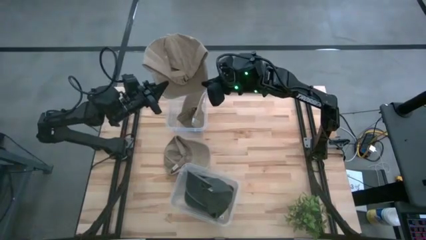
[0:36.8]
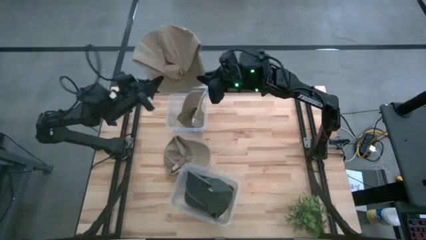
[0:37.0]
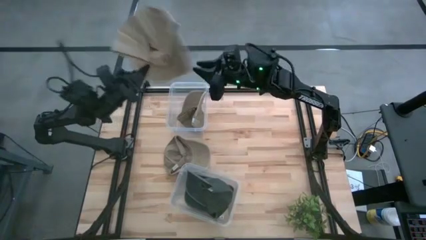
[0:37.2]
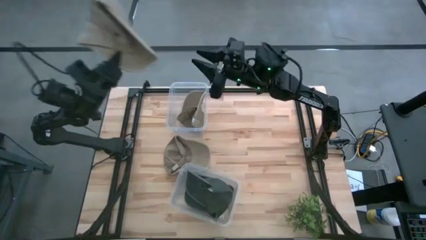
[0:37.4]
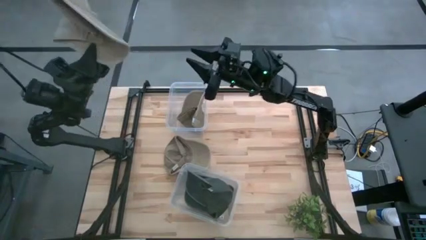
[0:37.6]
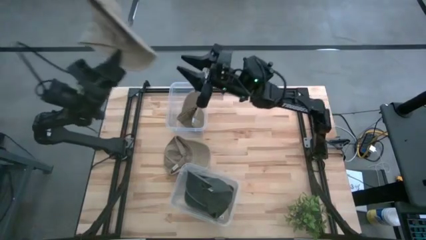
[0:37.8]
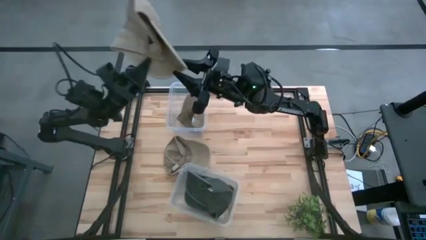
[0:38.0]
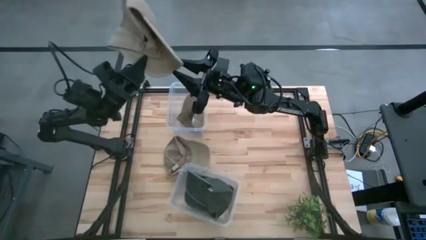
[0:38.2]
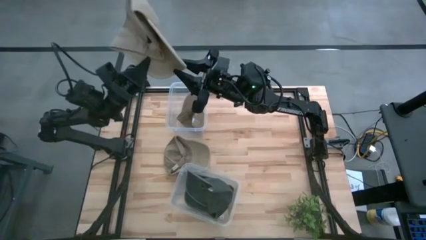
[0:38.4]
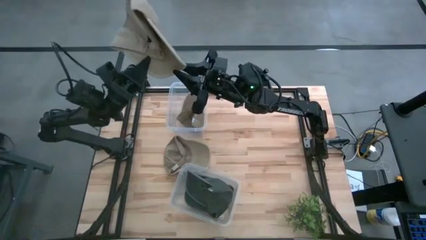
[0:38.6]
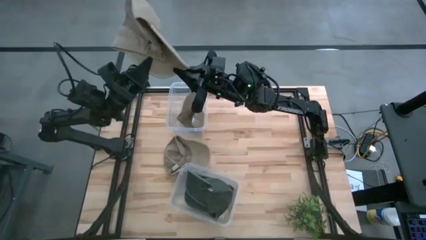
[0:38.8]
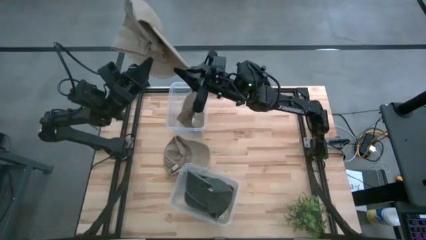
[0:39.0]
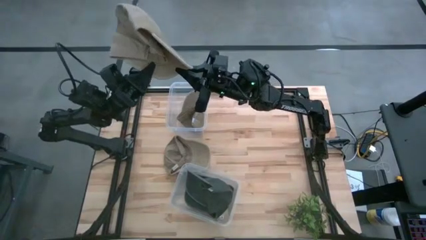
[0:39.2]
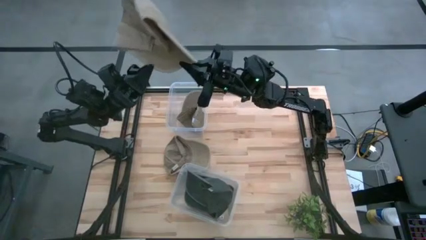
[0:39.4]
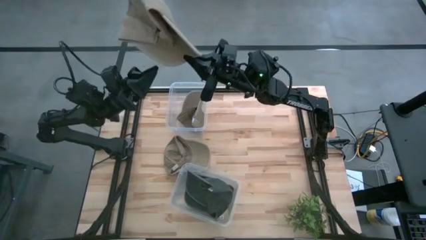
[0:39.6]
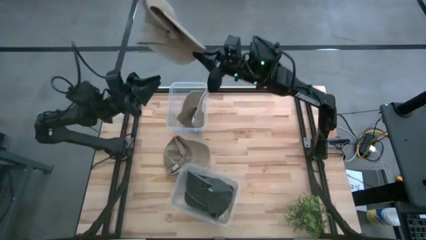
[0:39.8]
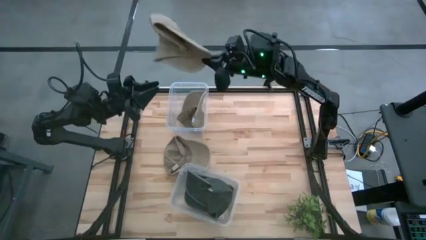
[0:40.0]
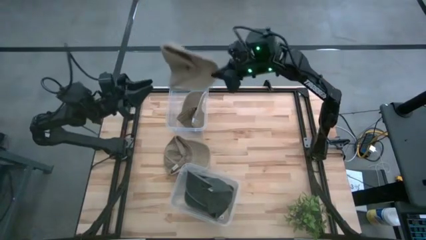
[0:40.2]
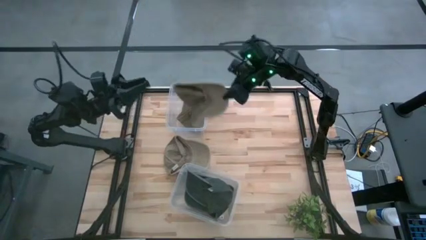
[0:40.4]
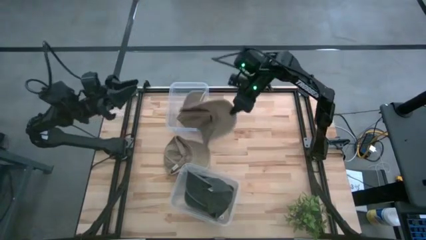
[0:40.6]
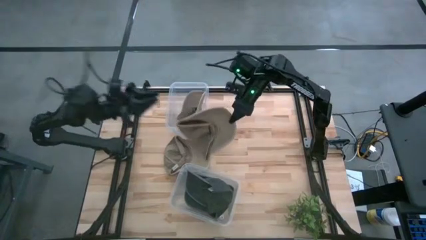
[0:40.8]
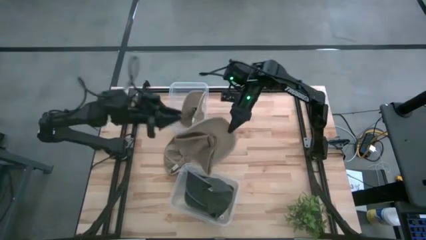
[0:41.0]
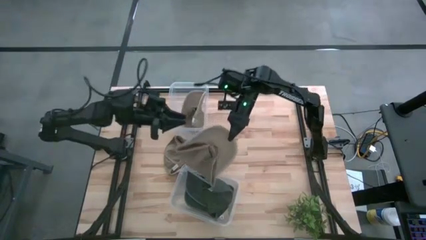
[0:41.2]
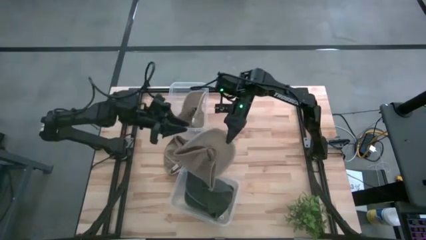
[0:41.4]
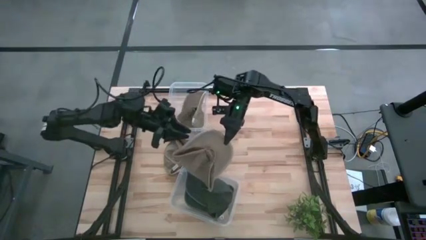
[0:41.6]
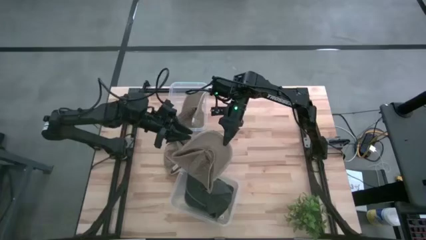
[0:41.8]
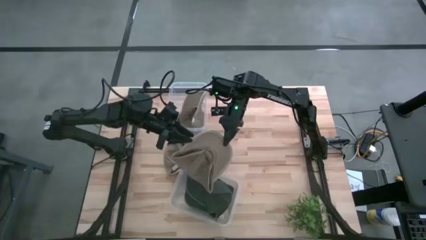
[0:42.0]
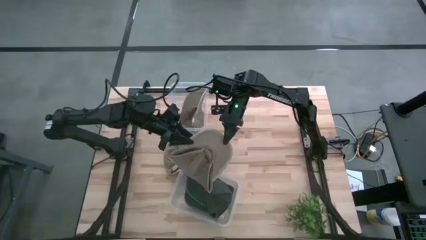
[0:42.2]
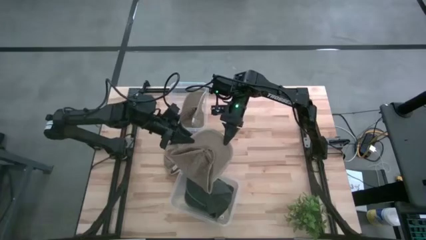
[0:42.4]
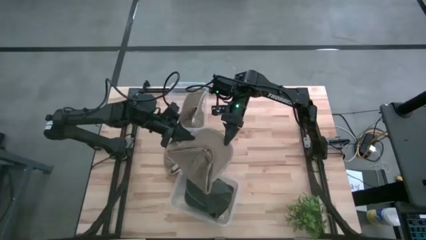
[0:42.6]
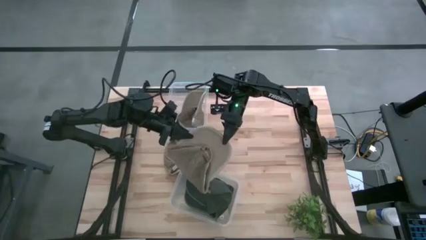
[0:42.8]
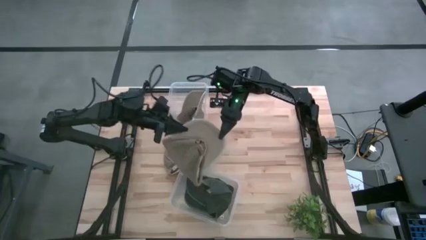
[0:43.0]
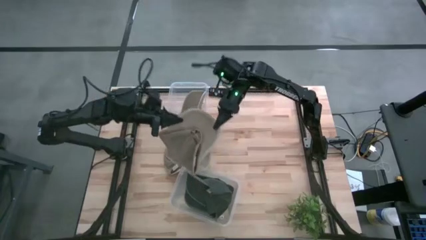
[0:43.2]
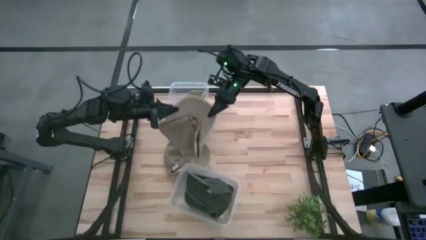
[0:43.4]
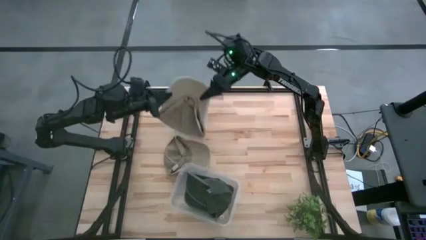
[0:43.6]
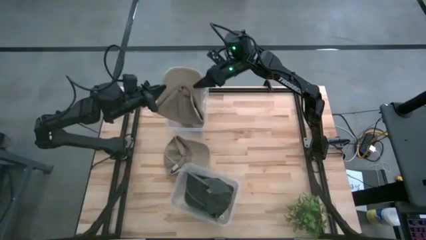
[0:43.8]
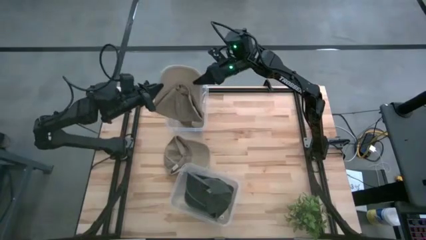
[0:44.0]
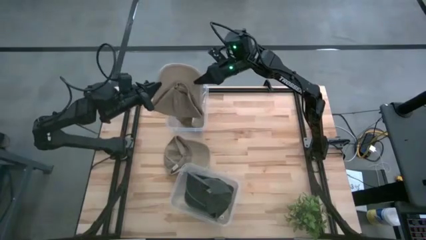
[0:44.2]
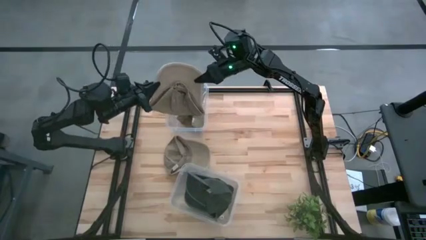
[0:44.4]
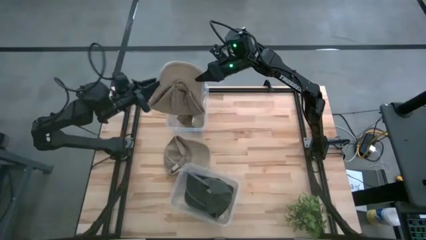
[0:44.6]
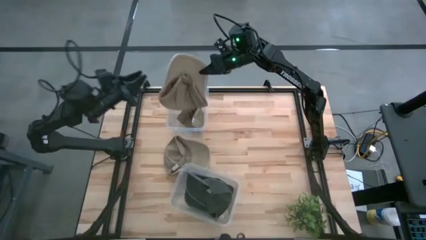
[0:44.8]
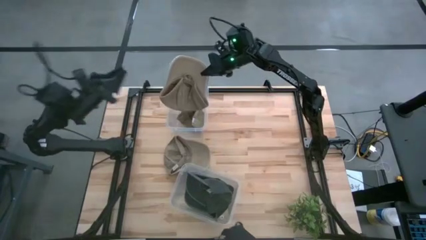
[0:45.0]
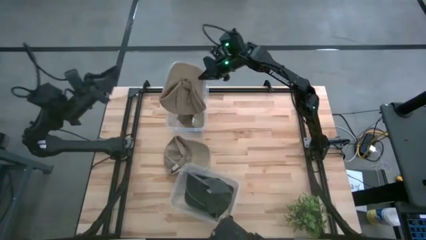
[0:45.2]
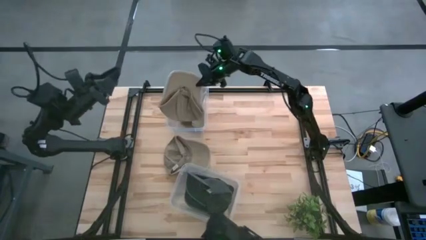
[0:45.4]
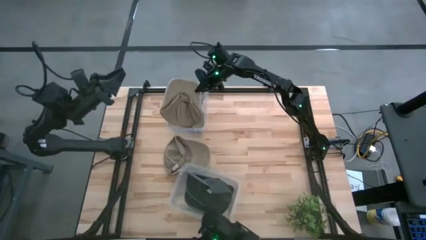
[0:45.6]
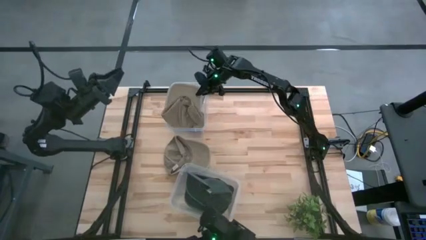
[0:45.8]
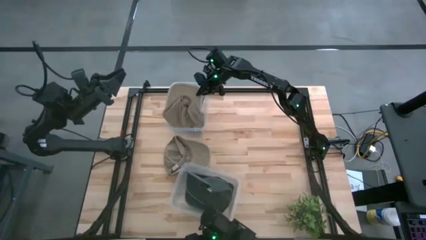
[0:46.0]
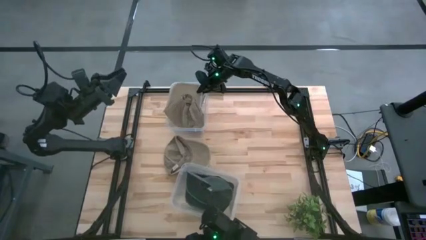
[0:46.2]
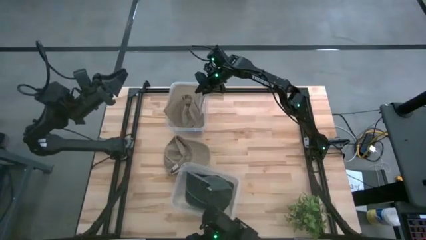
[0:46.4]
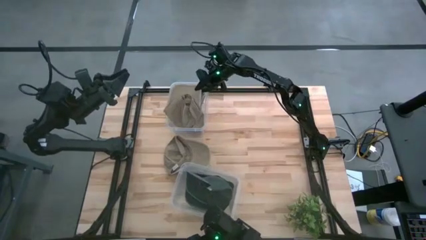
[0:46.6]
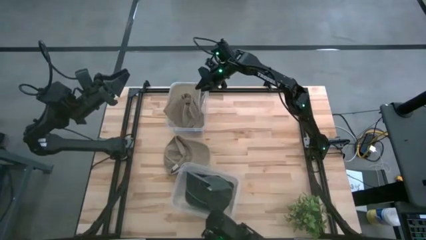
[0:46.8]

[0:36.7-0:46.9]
Task: Pick & Place hat
Put the bottom brown cap into the top transparent bin

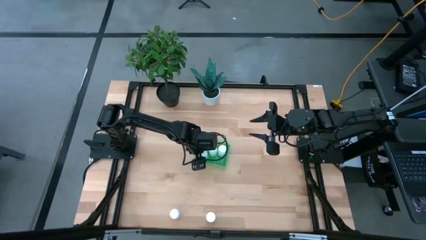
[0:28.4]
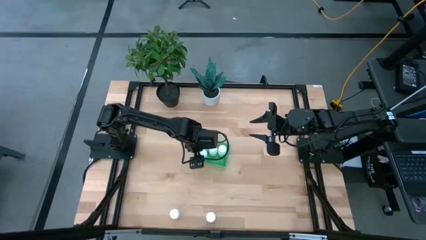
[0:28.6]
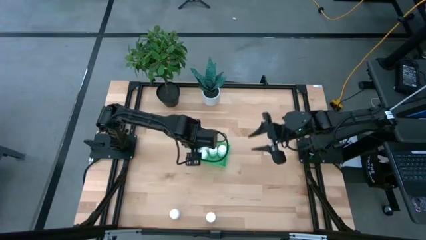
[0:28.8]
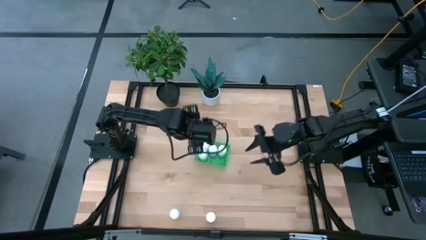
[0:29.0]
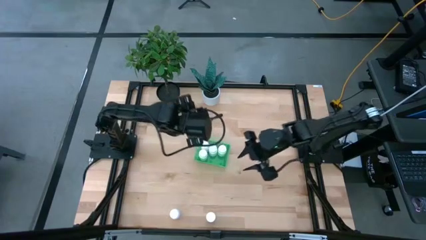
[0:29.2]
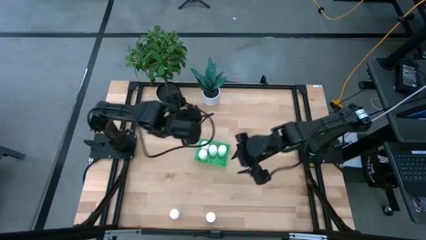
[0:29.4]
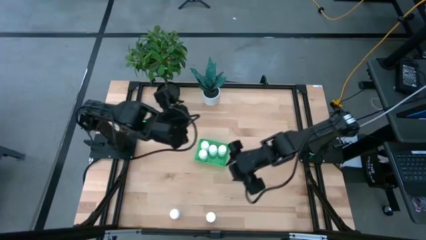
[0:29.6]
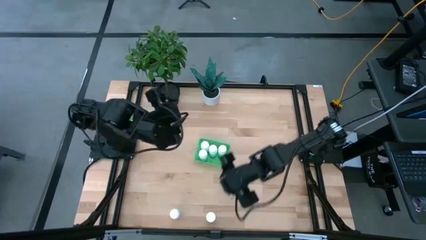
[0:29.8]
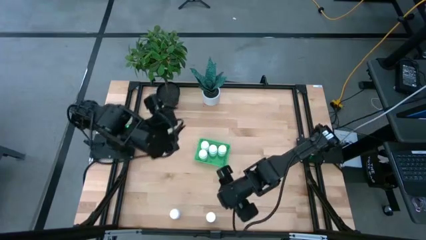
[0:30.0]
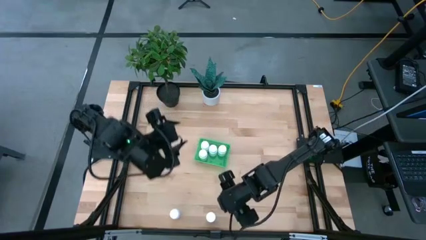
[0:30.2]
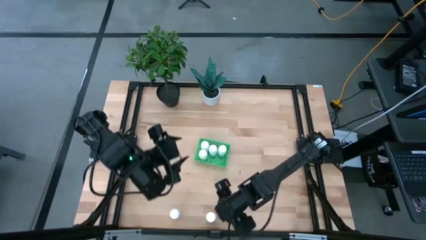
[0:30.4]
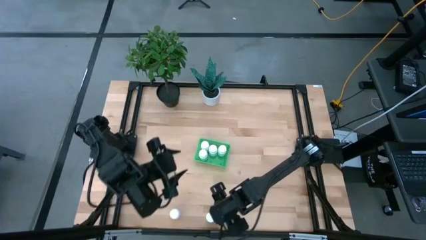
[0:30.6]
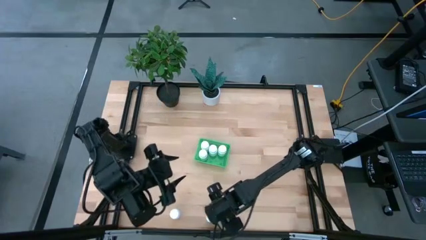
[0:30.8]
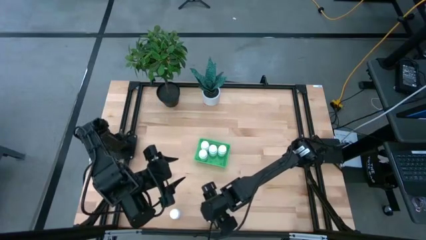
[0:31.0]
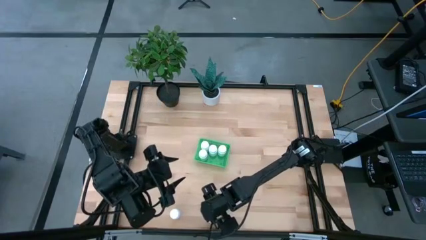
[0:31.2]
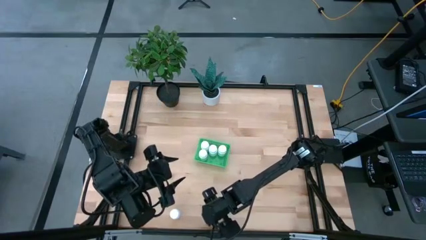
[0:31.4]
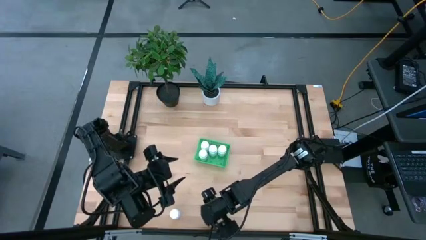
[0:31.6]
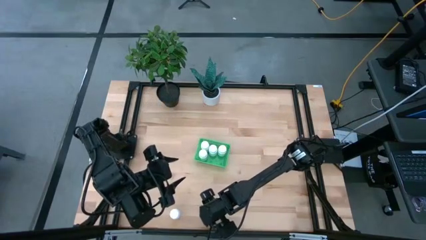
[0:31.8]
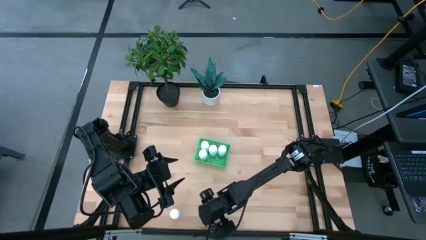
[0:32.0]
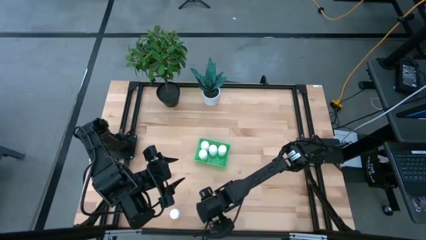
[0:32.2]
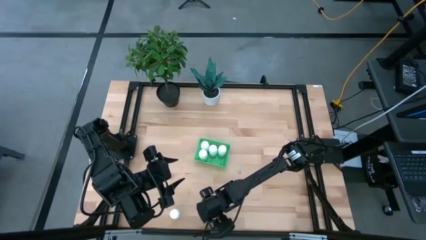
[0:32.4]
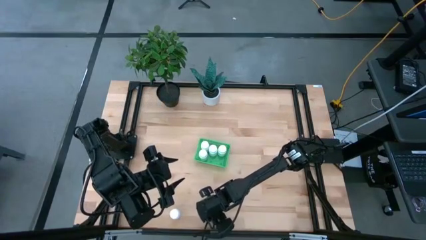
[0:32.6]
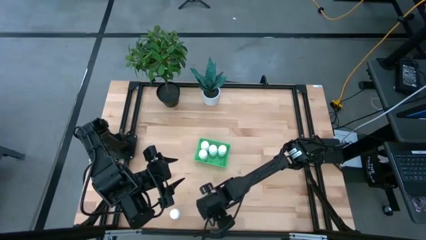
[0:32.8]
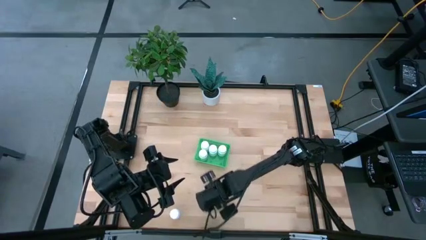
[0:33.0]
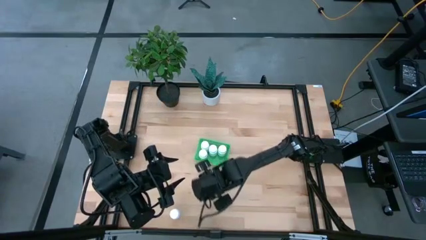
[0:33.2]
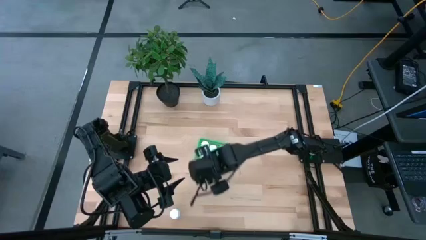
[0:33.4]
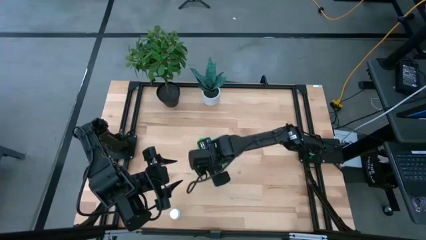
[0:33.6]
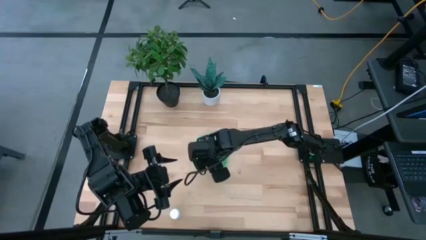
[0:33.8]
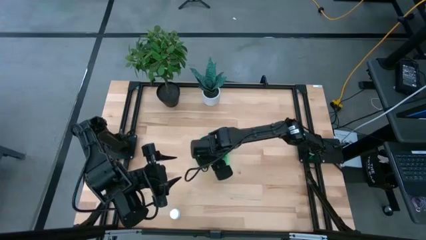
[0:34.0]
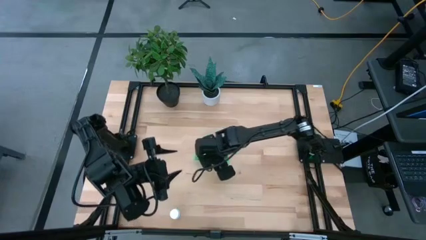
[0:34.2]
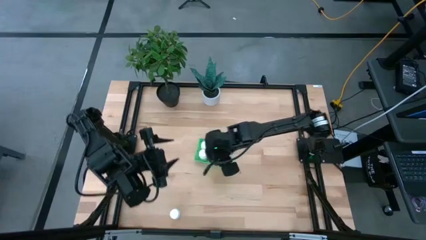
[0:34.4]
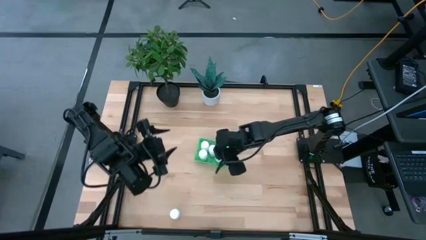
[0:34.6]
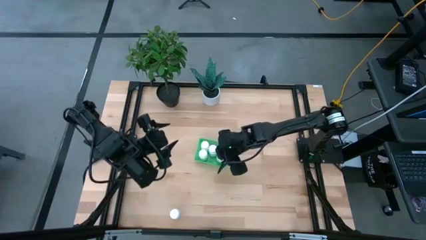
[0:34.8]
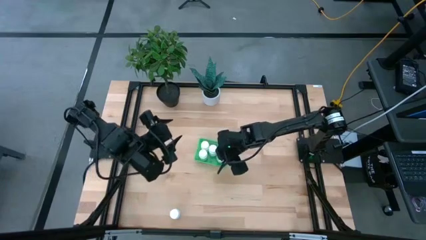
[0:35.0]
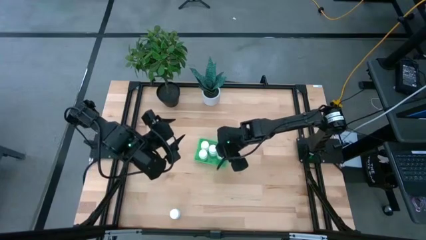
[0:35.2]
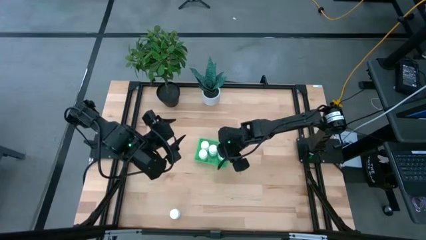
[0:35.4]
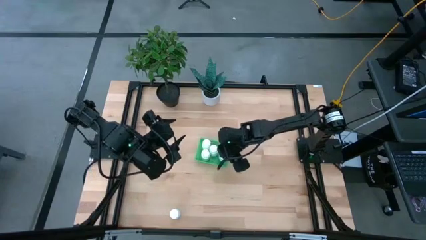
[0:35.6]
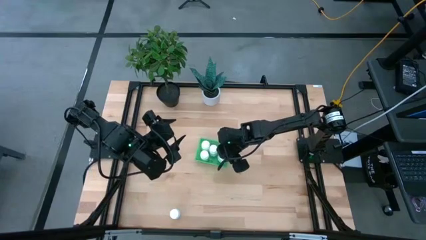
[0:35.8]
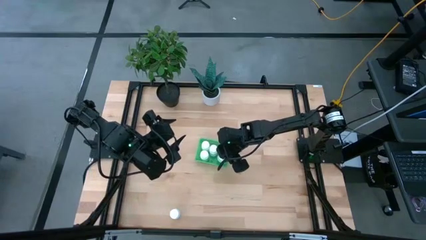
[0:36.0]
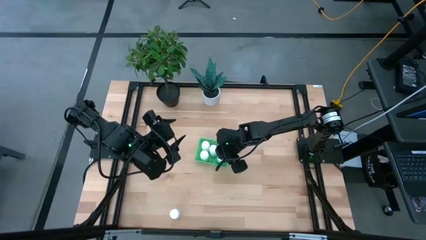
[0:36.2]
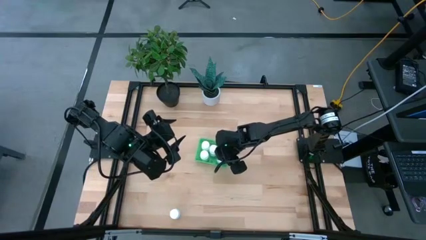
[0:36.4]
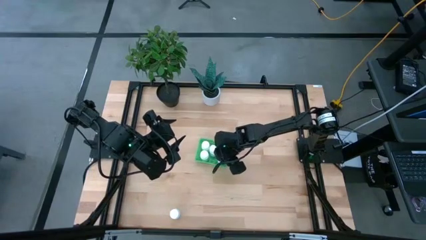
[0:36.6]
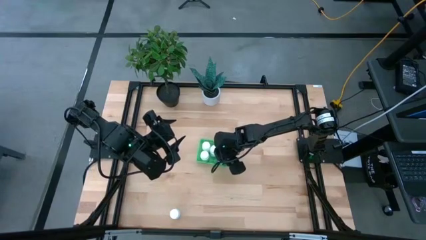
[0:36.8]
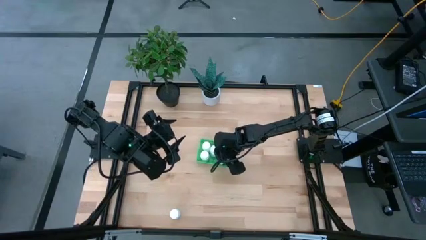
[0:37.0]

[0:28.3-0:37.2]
Task: Pick and place pill bottles into a basket
Put the right pill bottle into the bin
